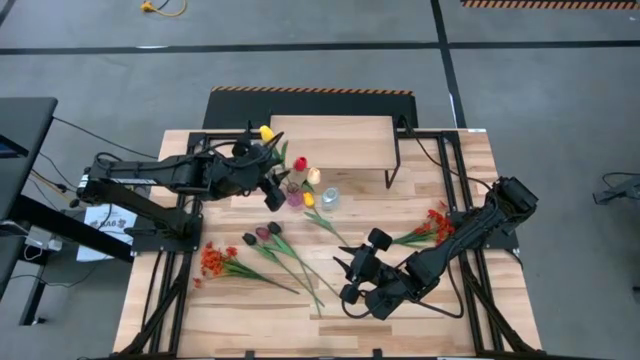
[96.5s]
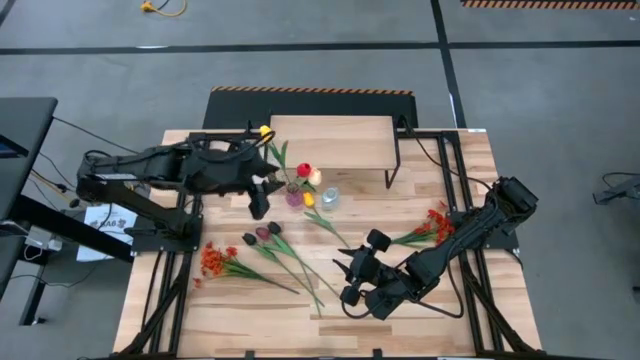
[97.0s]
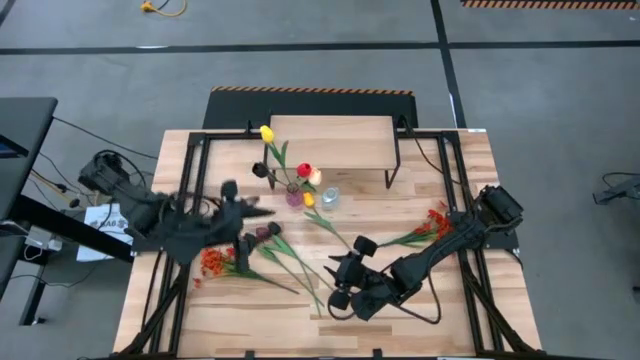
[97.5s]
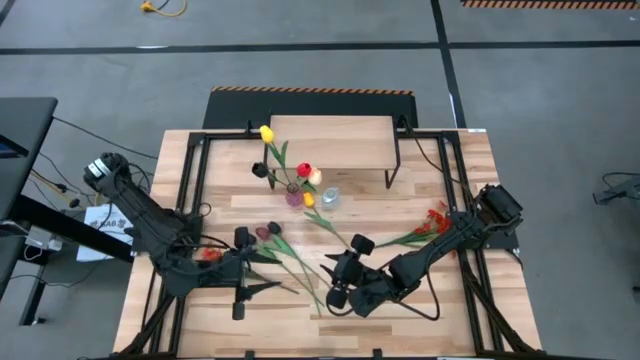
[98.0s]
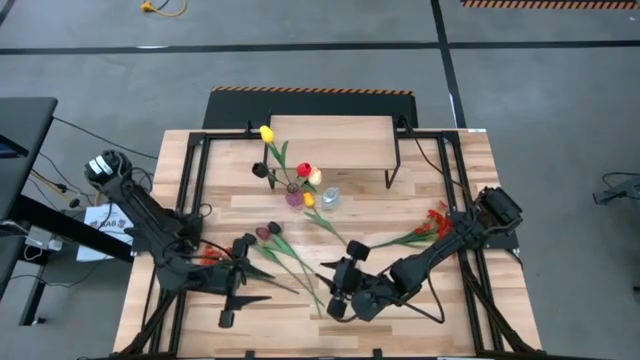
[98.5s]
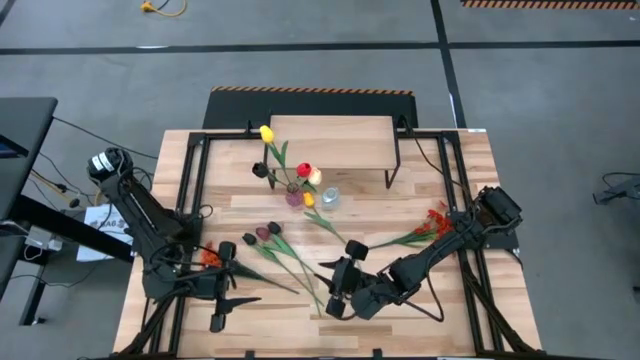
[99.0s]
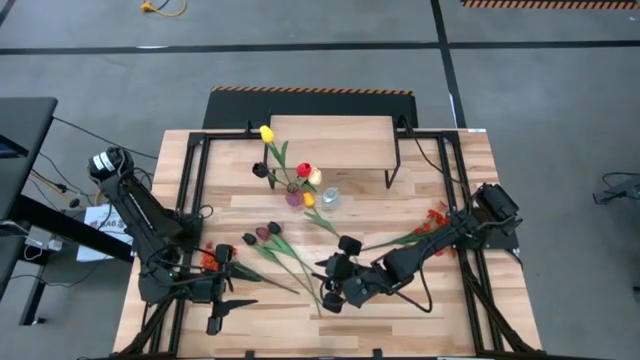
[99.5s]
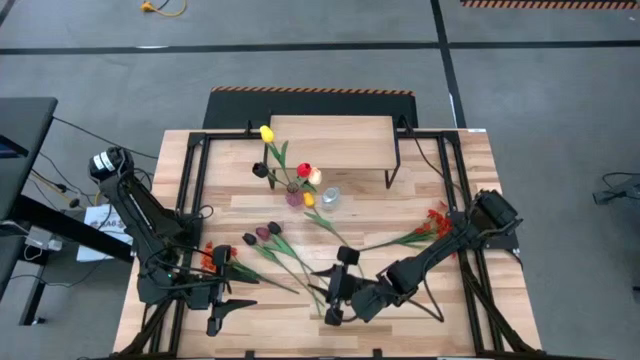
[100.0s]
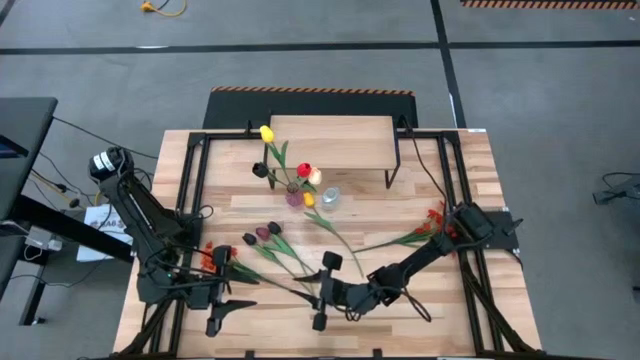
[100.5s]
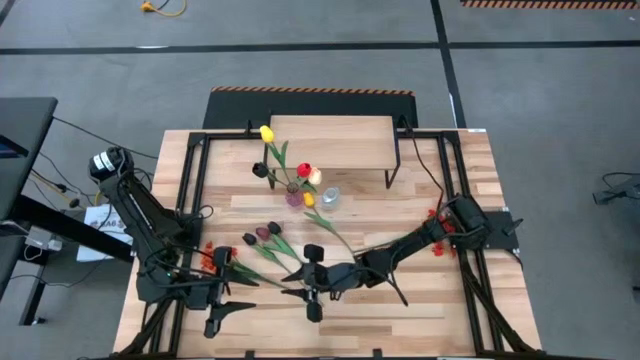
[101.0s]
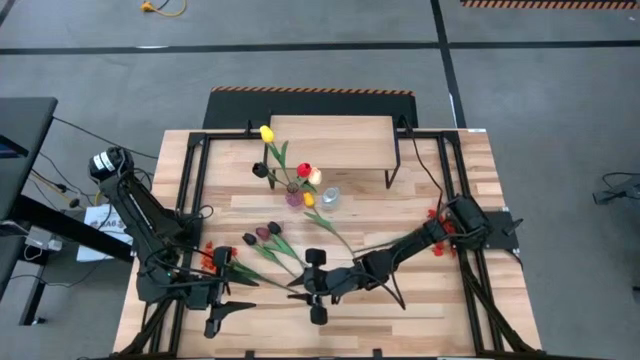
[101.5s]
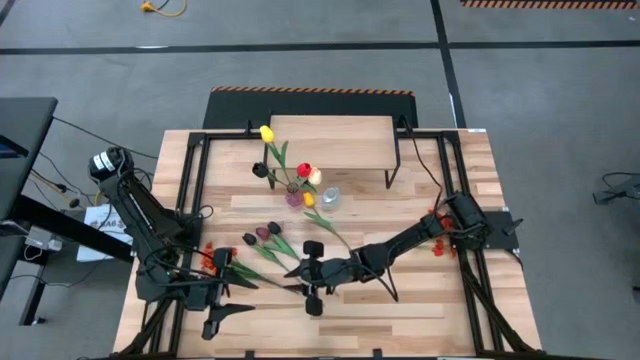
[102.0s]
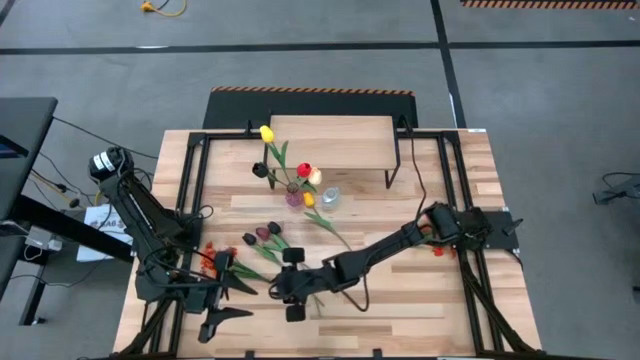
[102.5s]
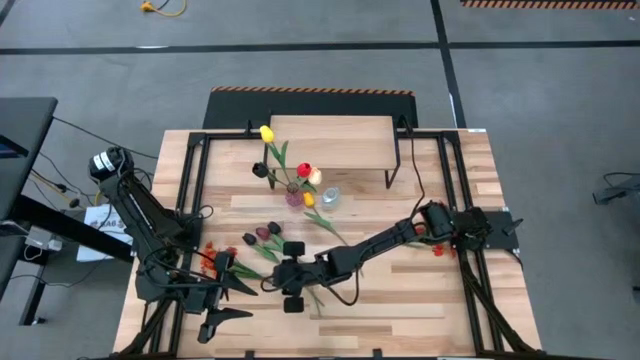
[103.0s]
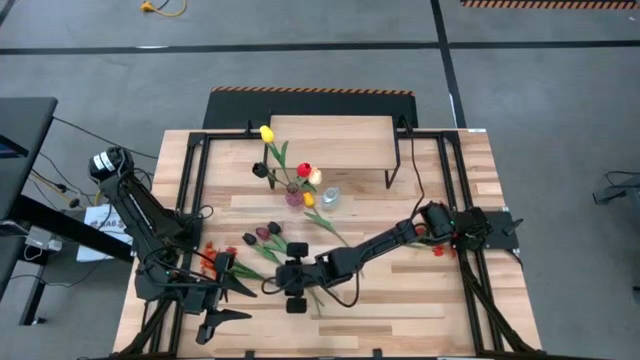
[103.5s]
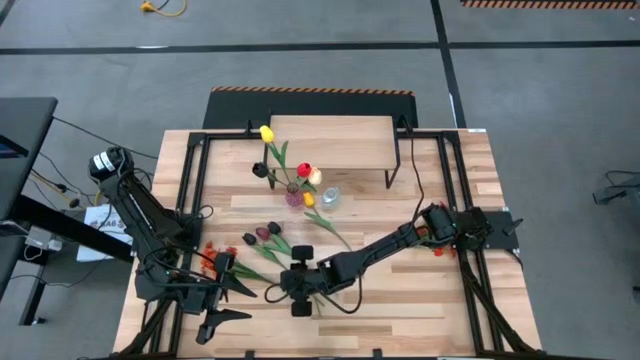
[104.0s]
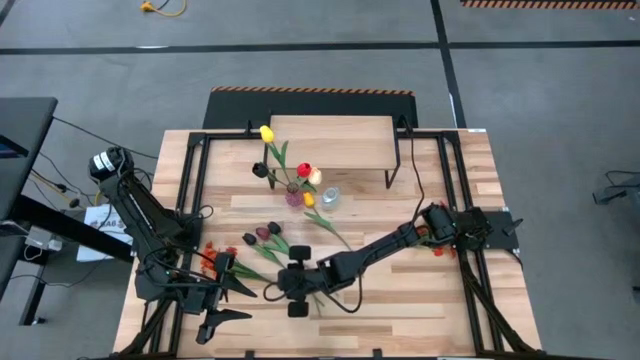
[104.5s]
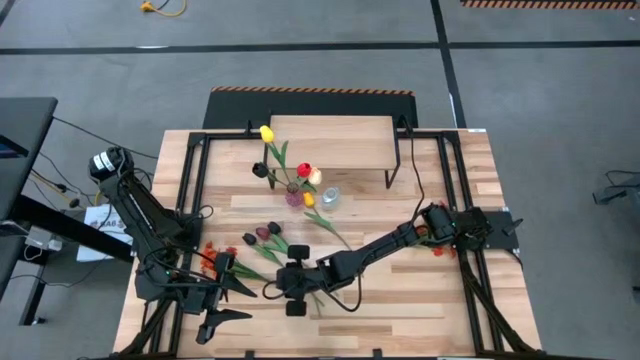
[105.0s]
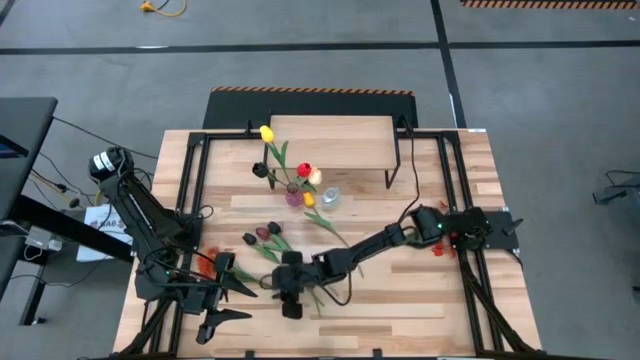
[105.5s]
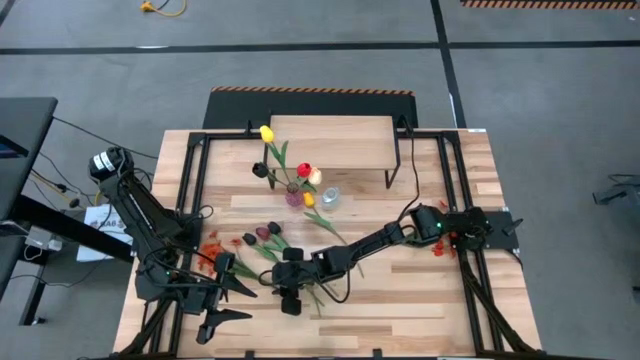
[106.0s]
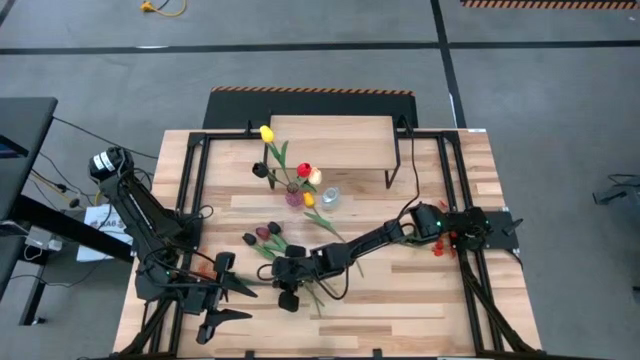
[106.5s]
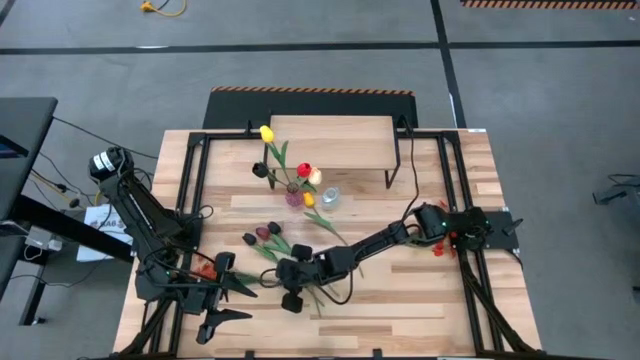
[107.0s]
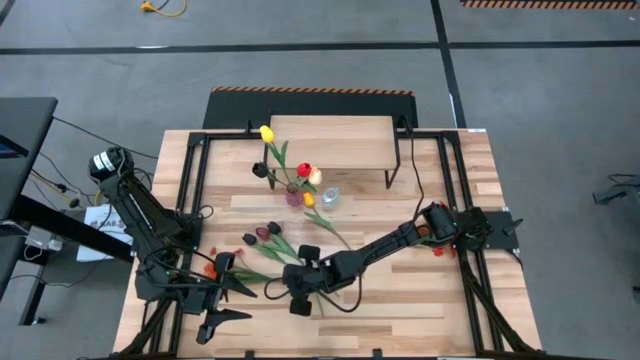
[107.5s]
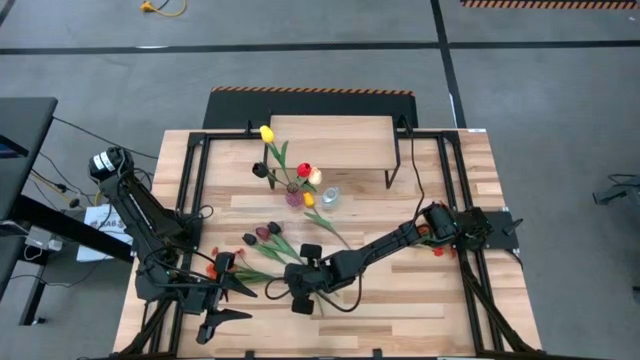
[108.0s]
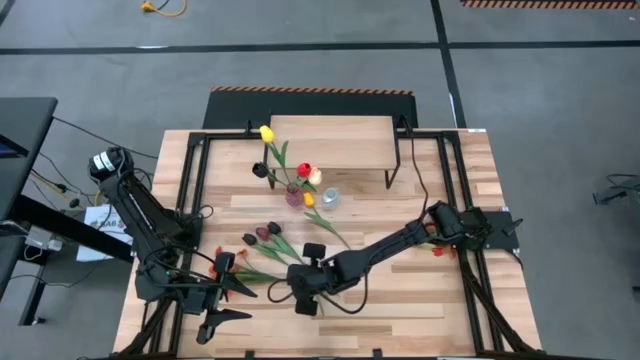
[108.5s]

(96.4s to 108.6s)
Task: Pick and place flowers into a vace then onto a shelf
Put the bottom orange flowers into the violet vase

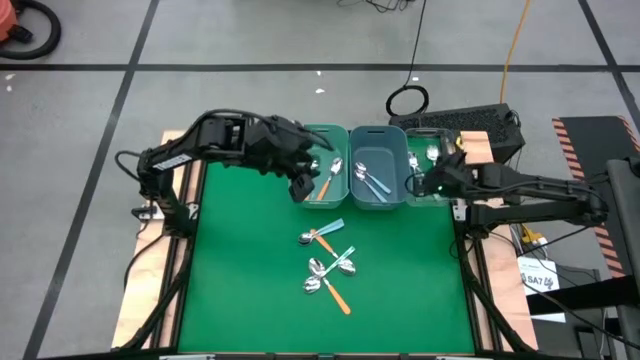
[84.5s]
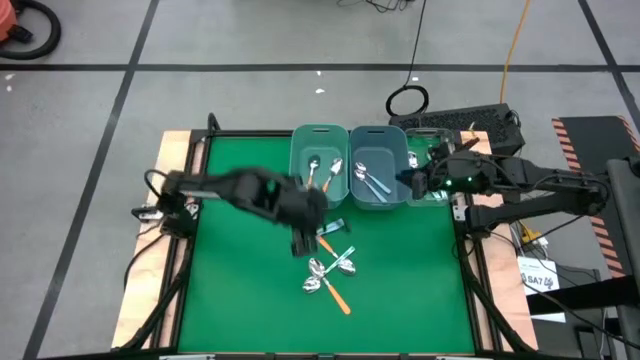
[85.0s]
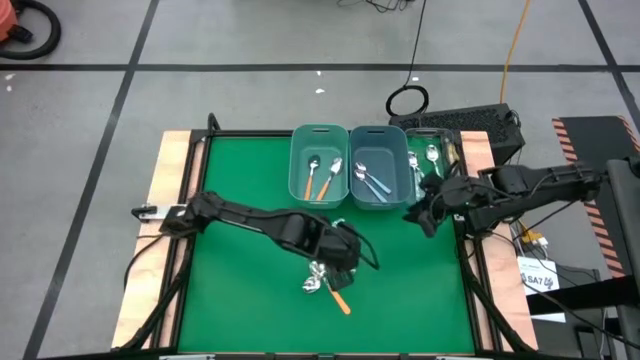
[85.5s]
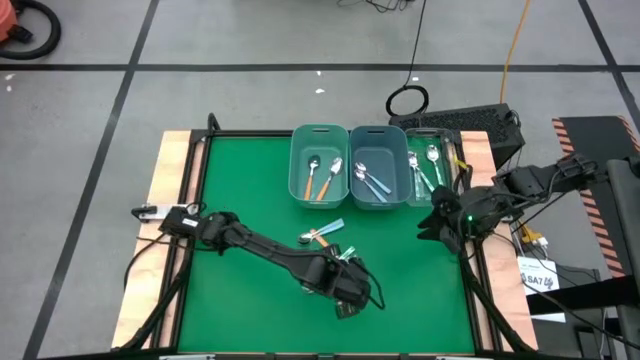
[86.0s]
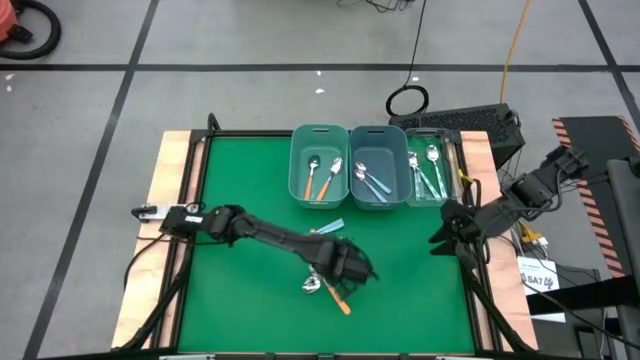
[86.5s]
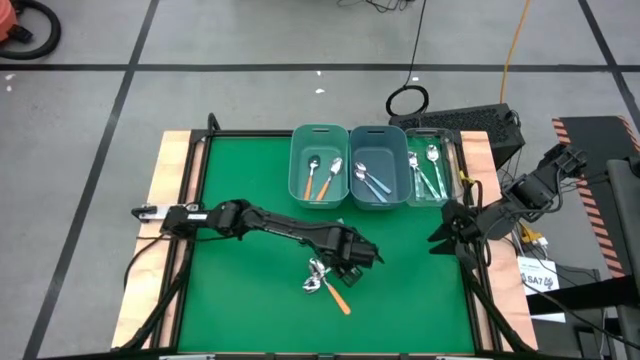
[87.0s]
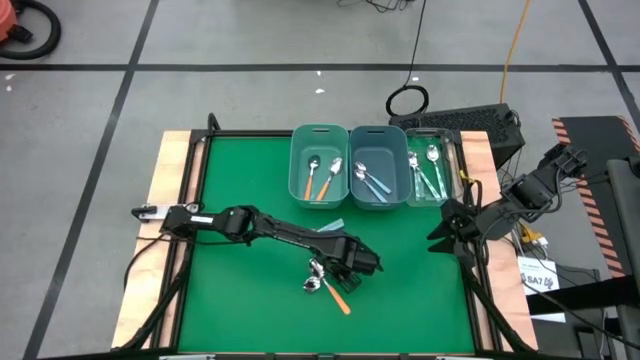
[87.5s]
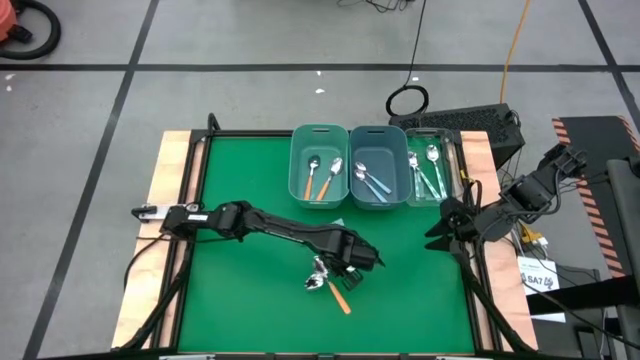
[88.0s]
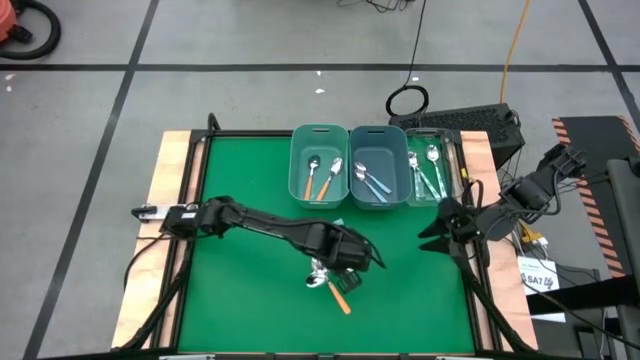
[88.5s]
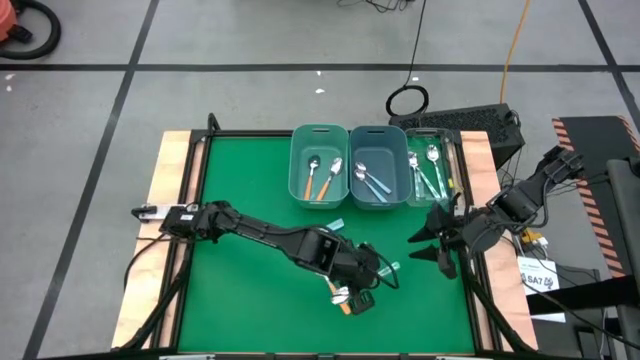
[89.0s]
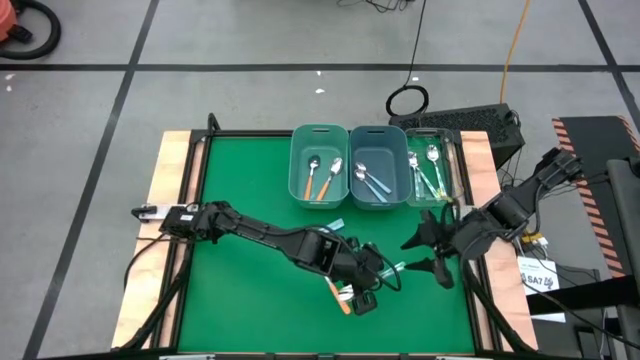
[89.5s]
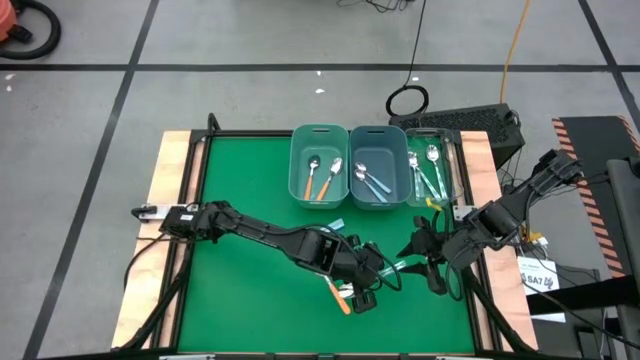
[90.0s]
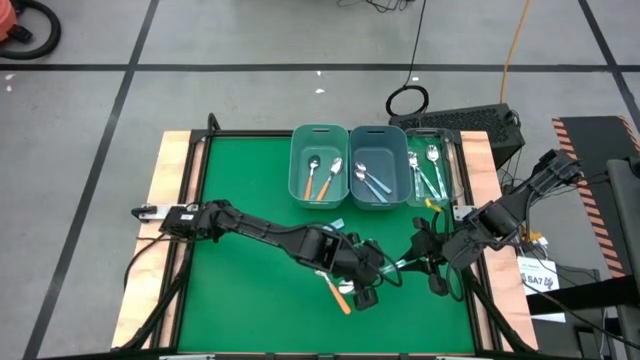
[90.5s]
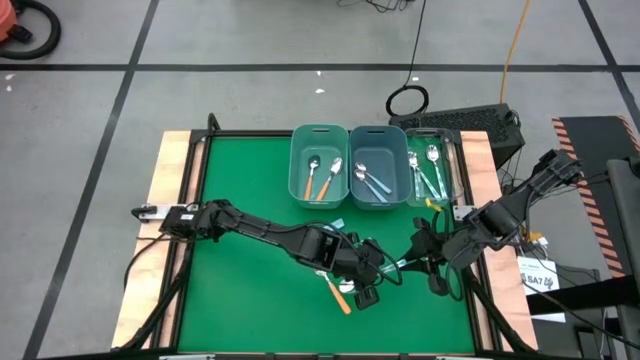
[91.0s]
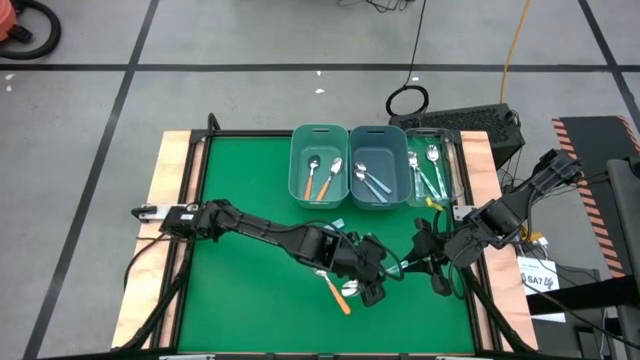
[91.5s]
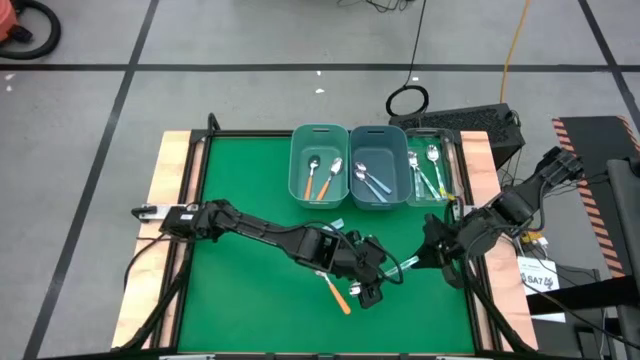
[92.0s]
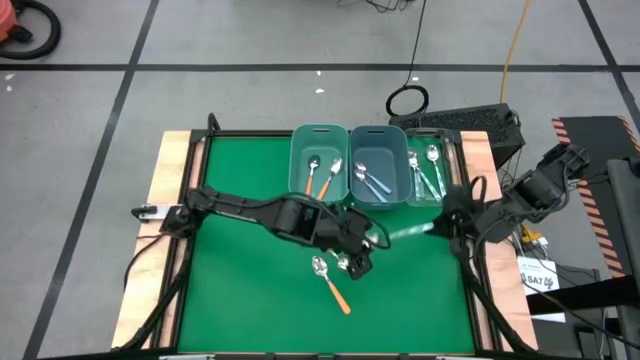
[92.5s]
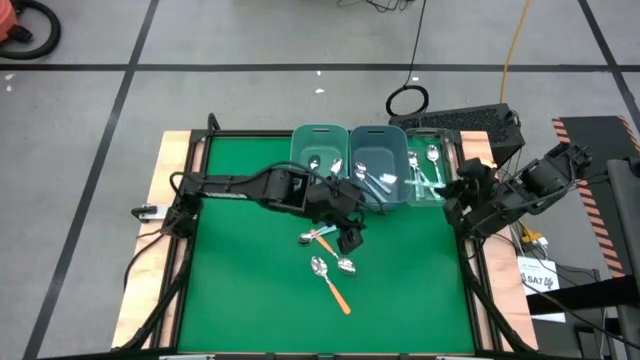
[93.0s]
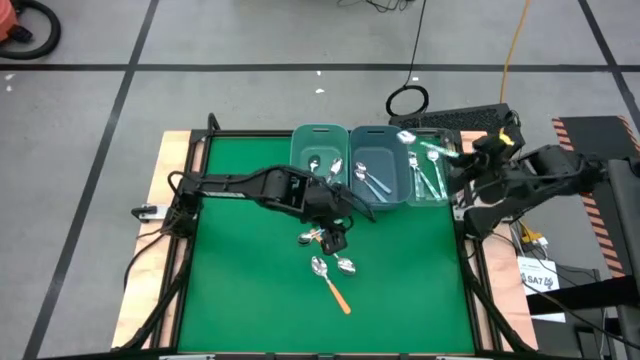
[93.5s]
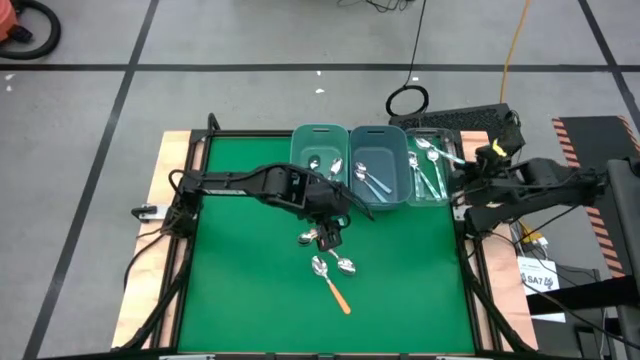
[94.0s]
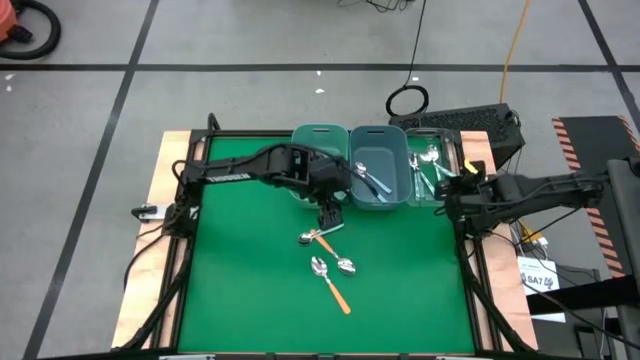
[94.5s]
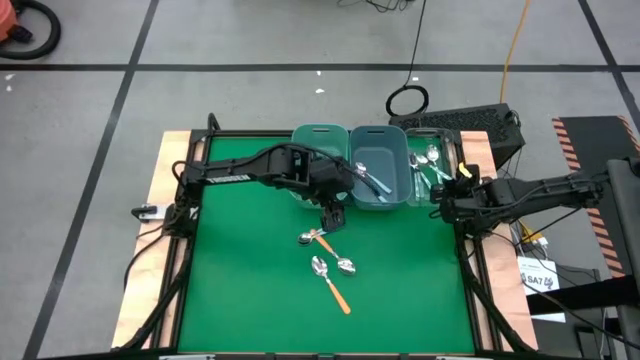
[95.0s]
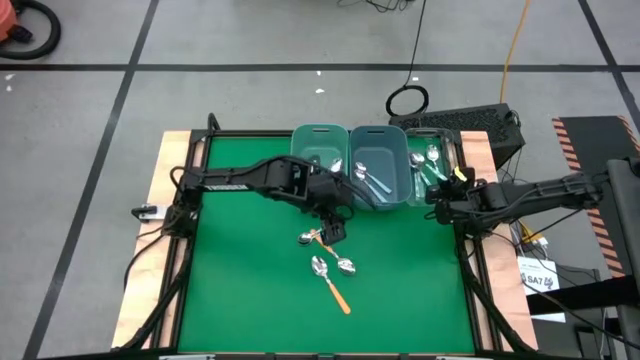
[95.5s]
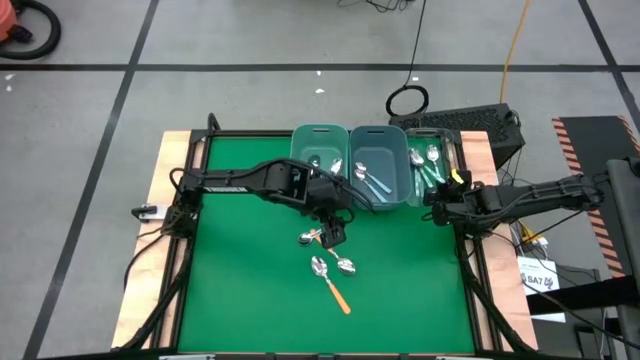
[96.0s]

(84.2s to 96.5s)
Task: Sort silverware by color (type)
Put the green spoon into the transparent bin
